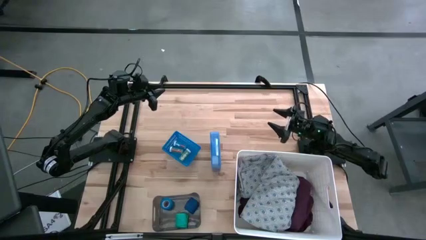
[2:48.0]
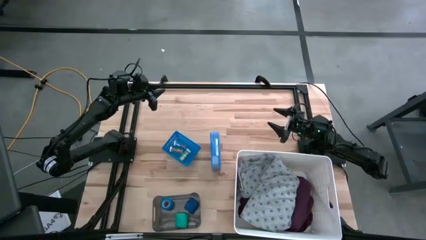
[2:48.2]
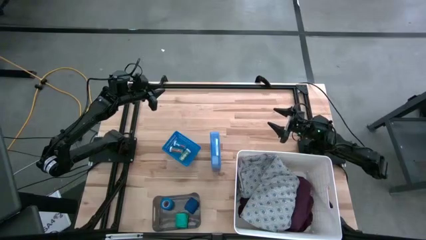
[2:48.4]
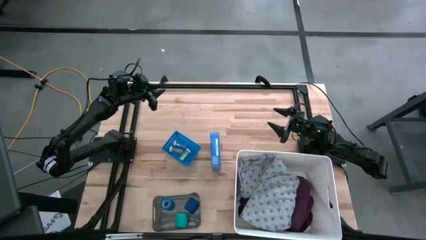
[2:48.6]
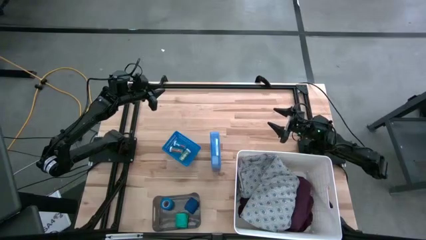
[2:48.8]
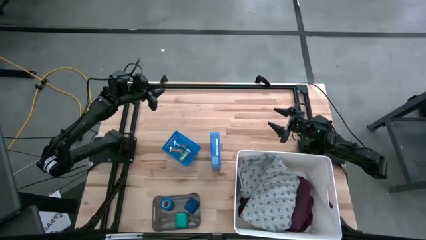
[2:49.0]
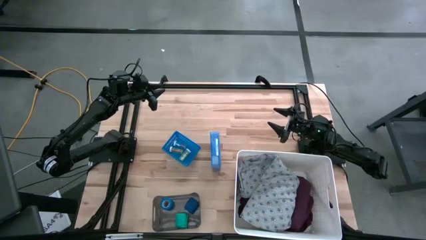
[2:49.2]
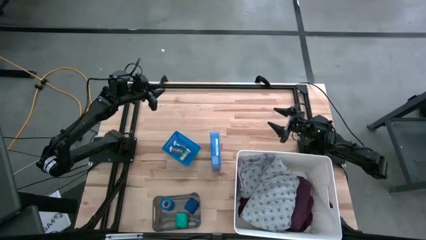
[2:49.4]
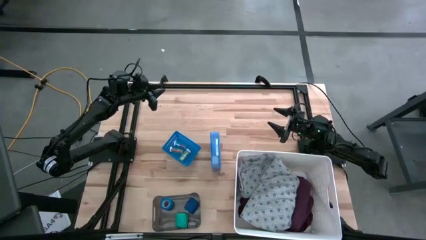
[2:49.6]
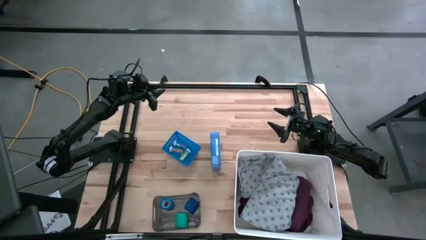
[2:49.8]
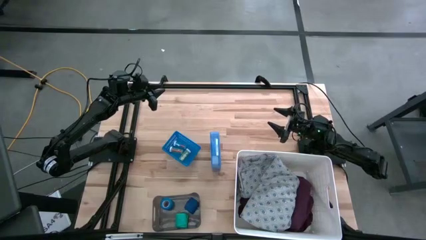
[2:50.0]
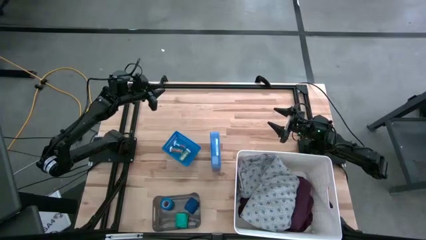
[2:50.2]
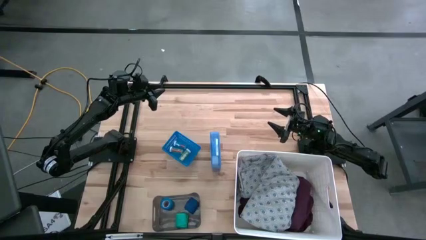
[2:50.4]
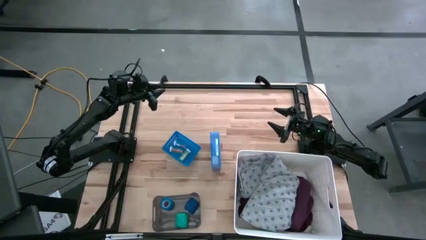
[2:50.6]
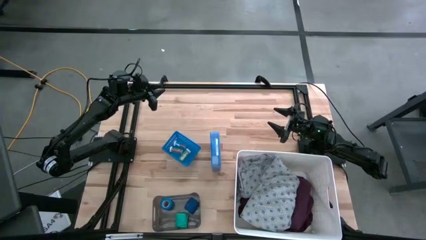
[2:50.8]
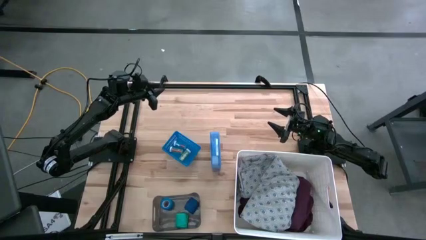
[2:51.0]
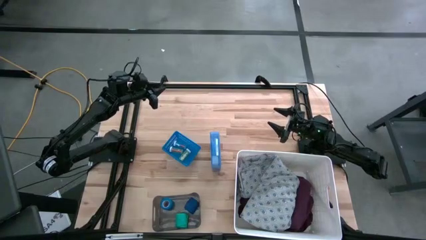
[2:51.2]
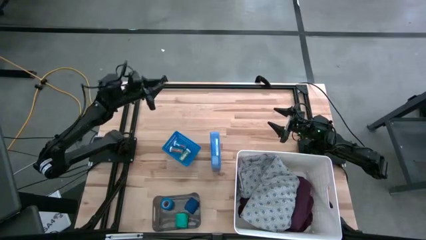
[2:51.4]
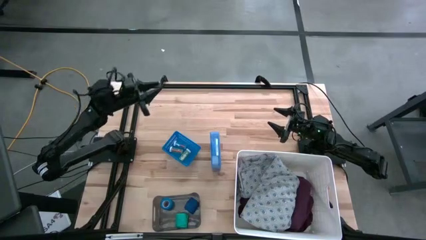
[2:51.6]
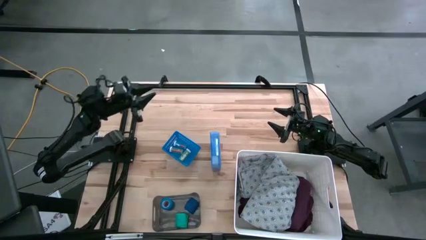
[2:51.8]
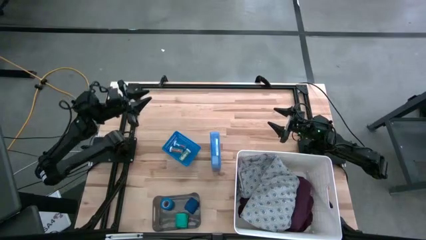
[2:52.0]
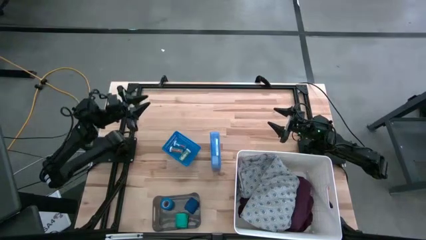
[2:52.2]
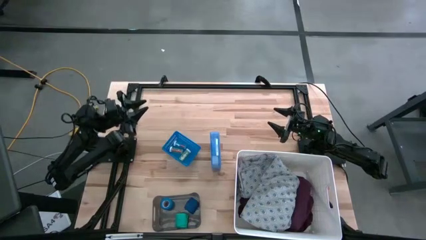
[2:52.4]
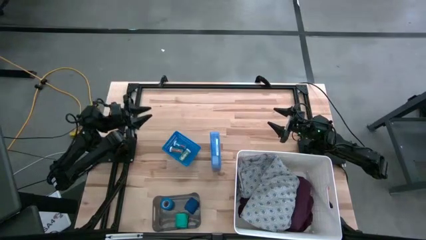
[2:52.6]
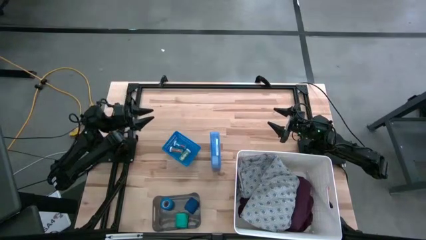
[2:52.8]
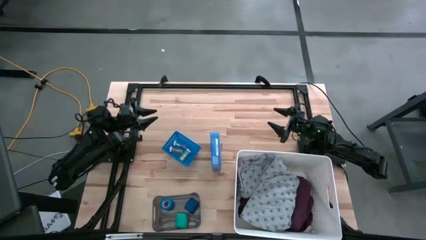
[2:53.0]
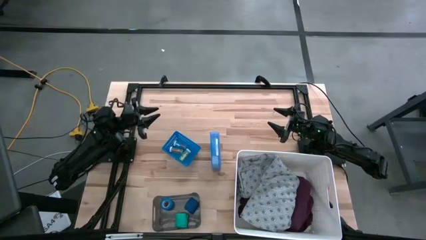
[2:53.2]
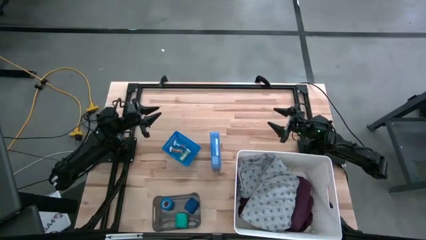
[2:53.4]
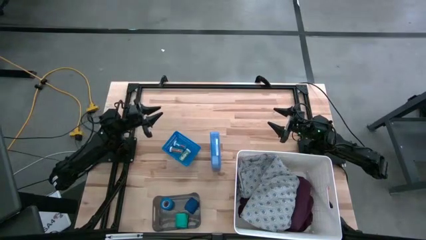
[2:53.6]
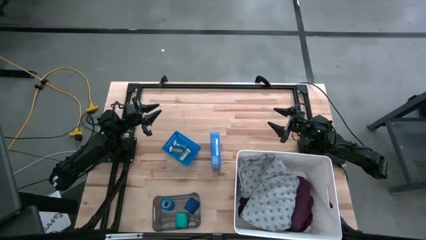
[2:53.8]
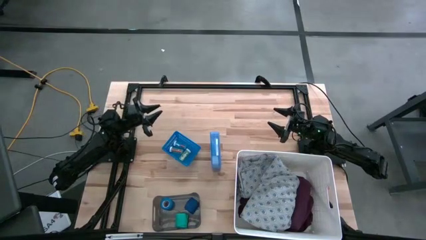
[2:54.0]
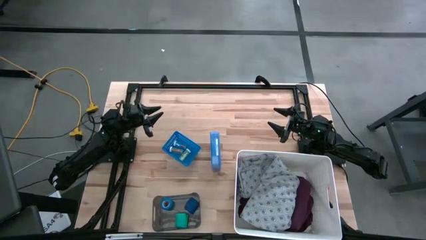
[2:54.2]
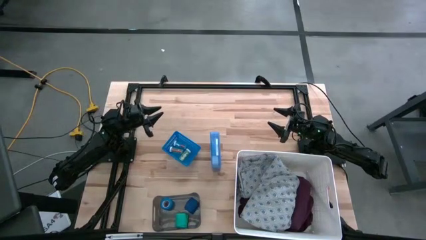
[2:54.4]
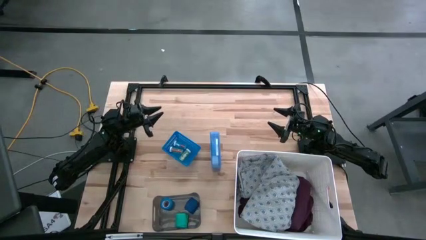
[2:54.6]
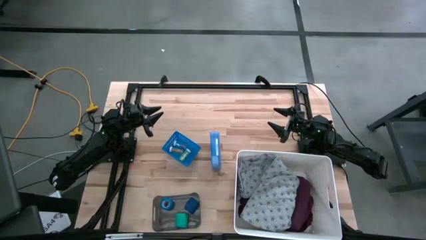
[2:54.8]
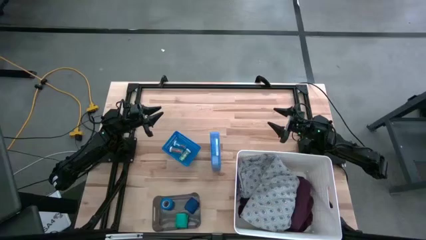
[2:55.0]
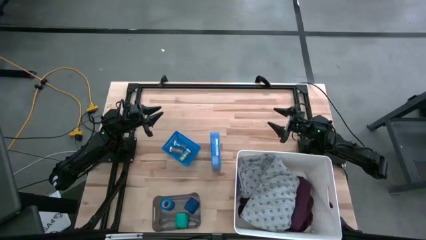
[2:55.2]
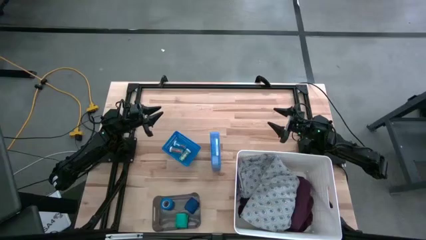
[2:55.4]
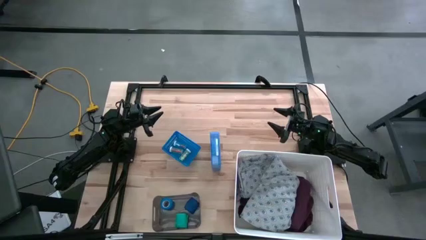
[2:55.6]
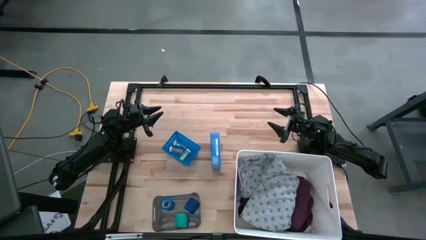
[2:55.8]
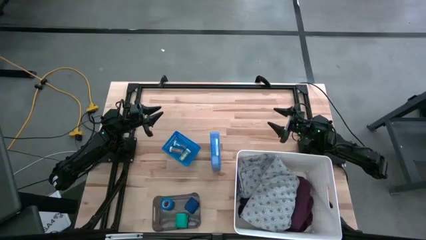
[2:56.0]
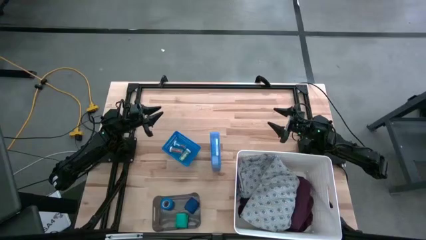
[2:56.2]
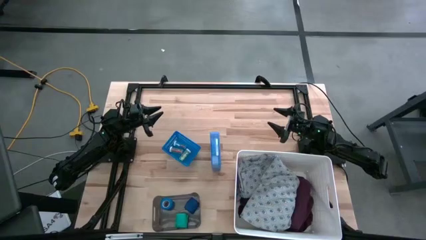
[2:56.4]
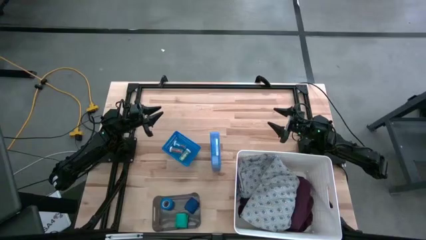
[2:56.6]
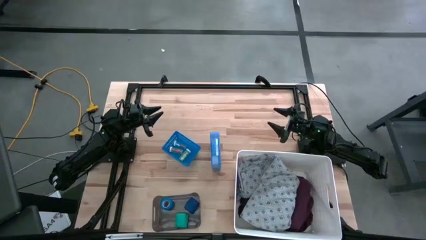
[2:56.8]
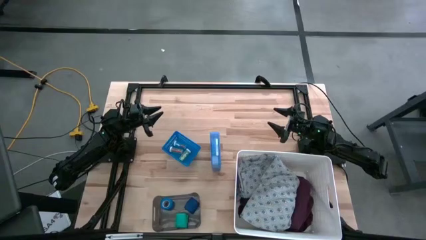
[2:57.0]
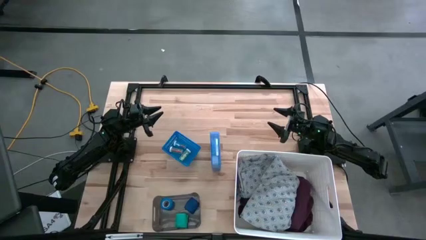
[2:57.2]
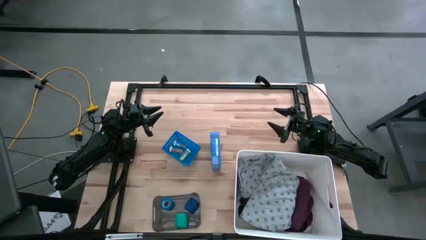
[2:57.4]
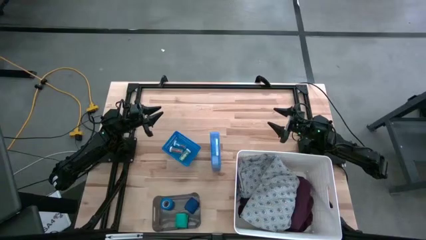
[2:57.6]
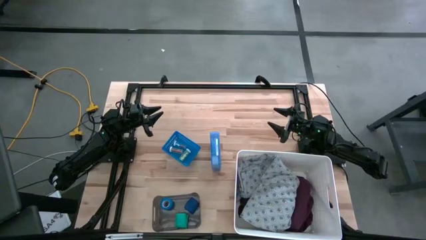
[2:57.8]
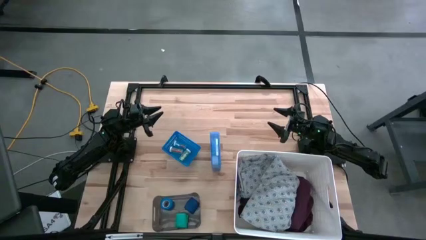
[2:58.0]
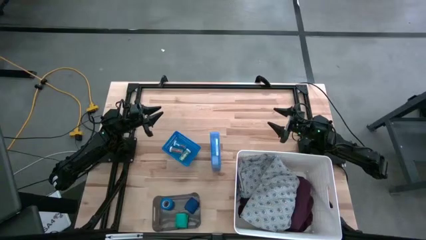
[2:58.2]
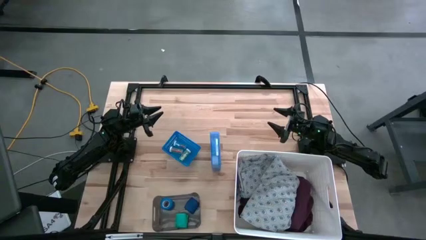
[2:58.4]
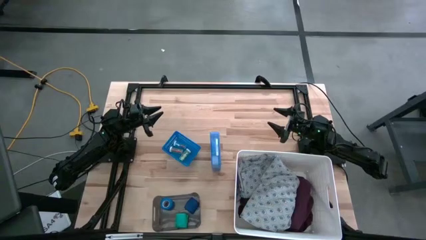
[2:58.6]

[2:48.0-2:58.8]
Task: Pick & Place Medicine items
Return to Home Position
